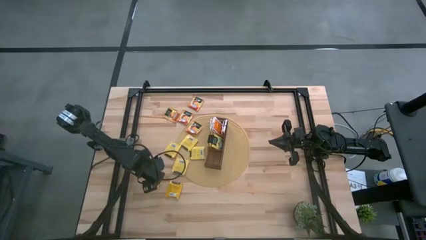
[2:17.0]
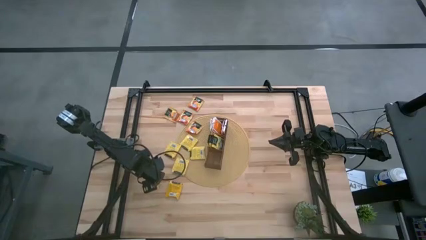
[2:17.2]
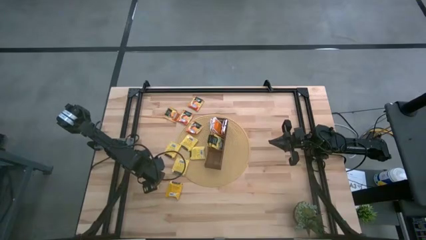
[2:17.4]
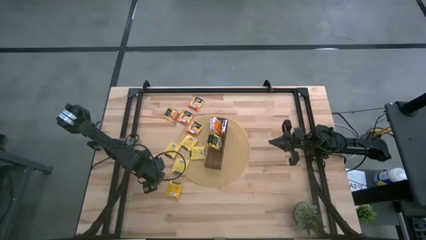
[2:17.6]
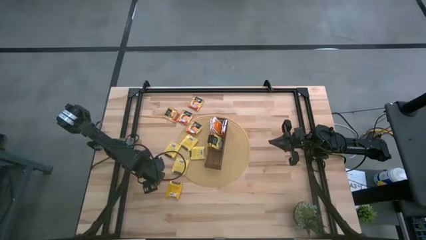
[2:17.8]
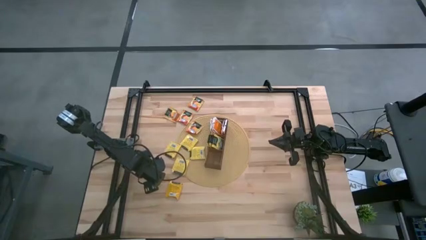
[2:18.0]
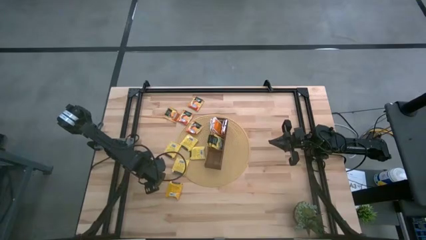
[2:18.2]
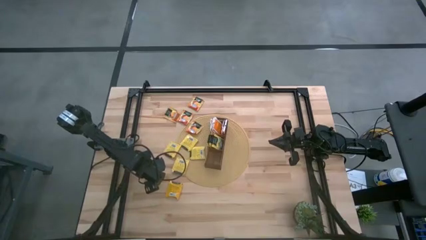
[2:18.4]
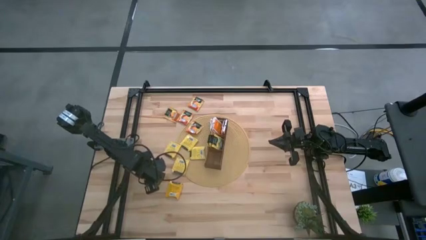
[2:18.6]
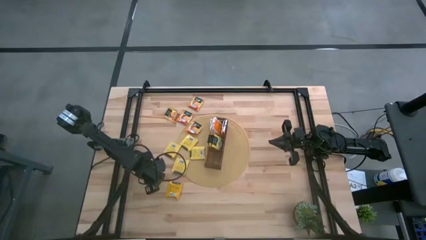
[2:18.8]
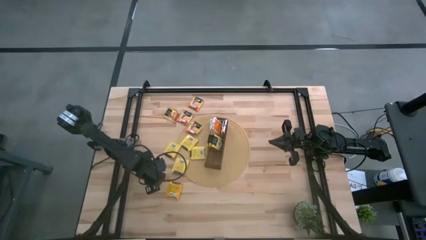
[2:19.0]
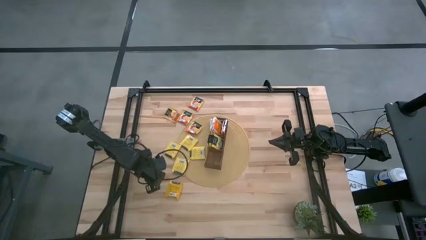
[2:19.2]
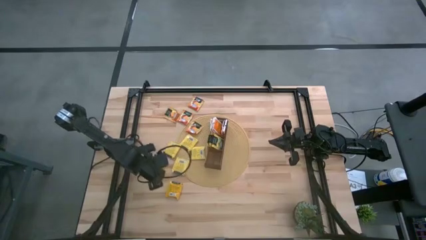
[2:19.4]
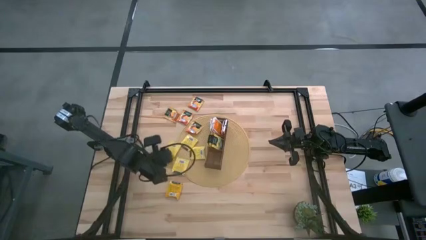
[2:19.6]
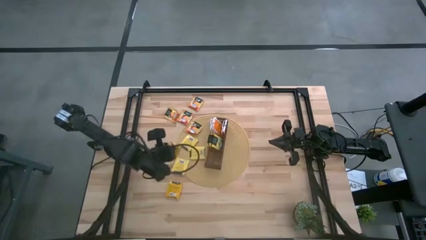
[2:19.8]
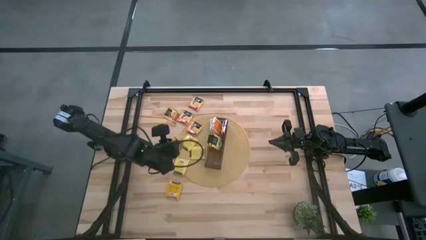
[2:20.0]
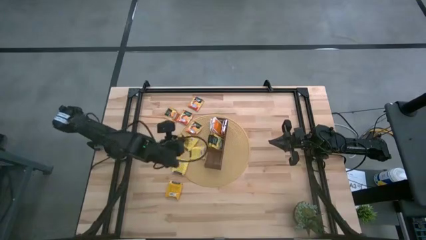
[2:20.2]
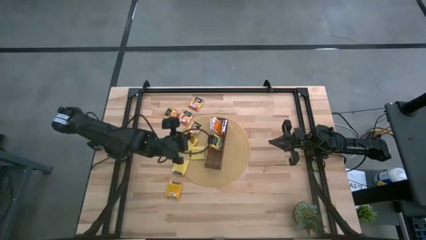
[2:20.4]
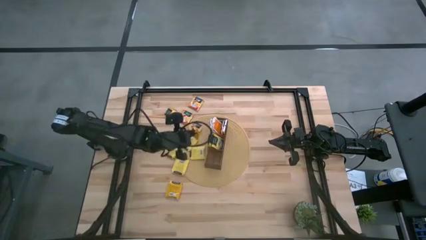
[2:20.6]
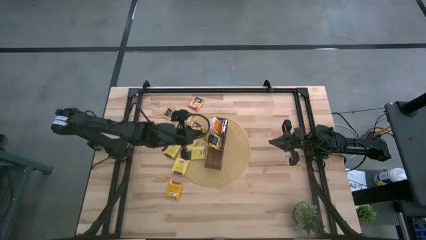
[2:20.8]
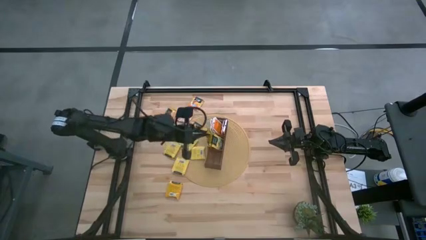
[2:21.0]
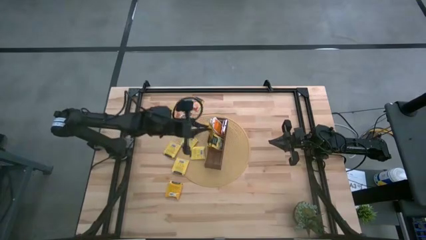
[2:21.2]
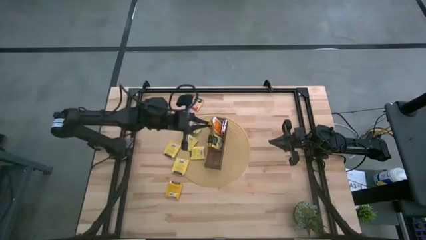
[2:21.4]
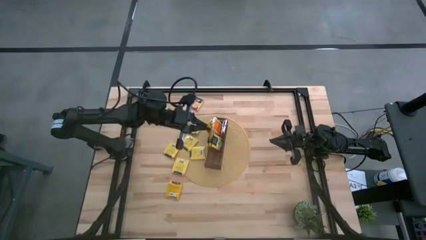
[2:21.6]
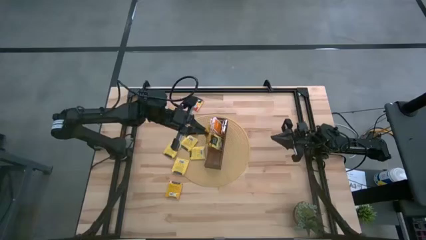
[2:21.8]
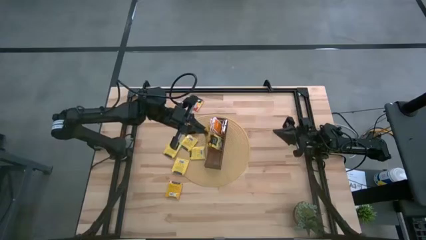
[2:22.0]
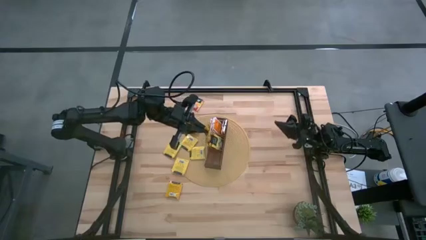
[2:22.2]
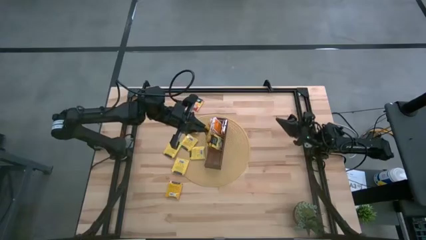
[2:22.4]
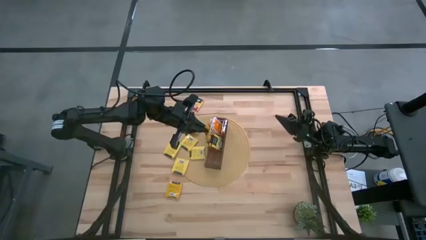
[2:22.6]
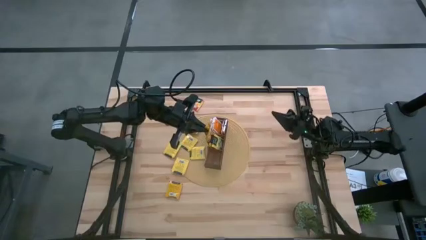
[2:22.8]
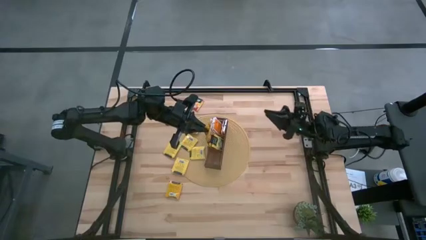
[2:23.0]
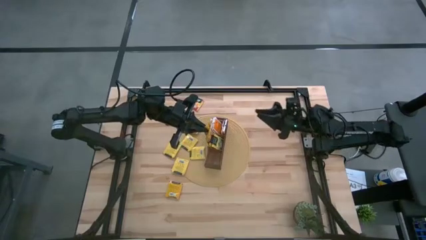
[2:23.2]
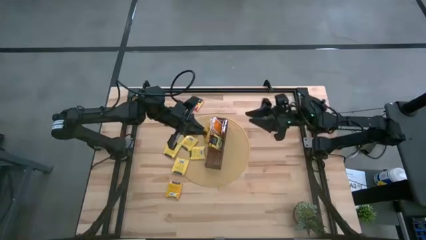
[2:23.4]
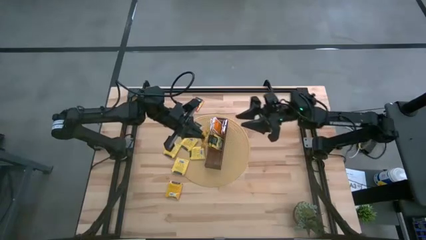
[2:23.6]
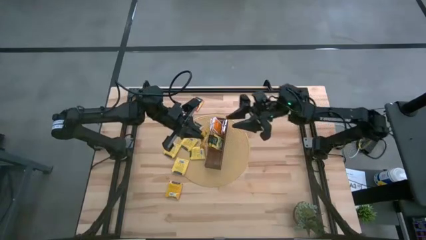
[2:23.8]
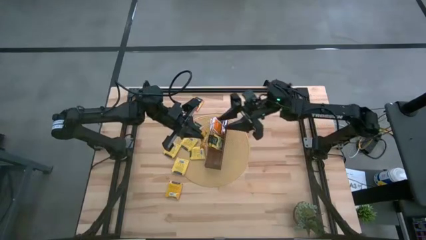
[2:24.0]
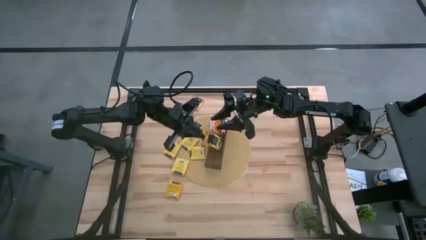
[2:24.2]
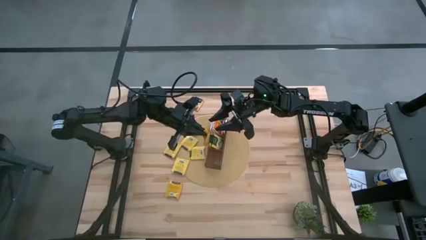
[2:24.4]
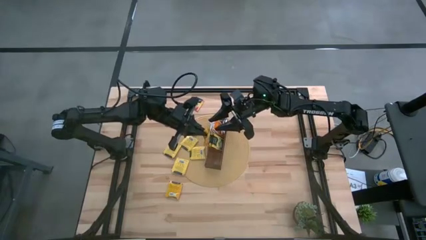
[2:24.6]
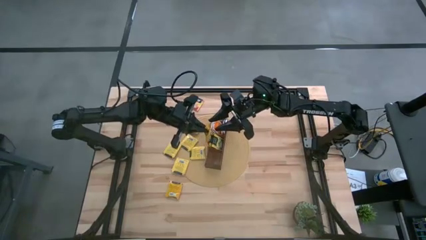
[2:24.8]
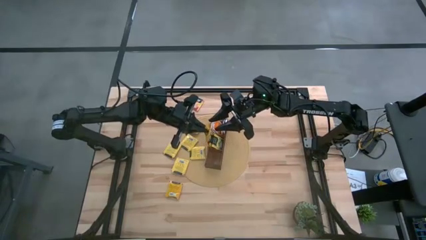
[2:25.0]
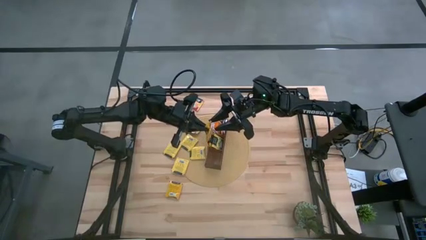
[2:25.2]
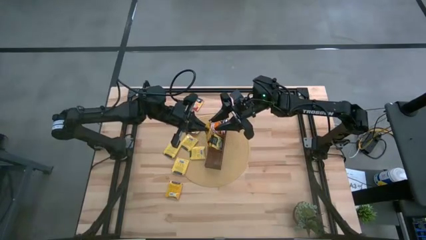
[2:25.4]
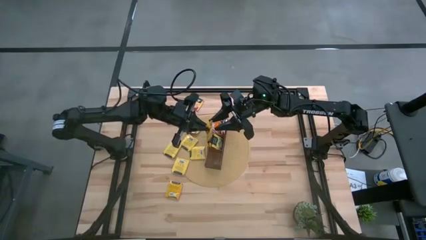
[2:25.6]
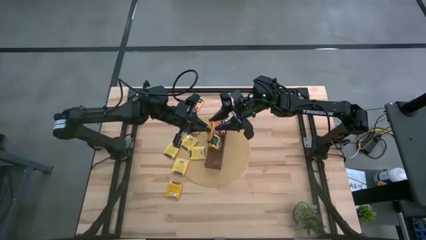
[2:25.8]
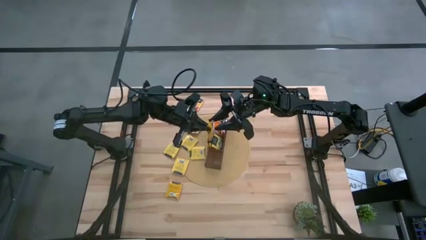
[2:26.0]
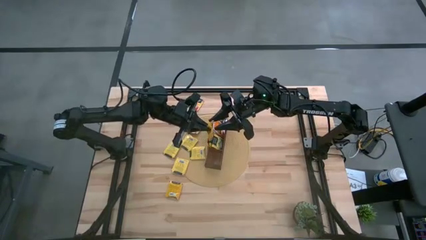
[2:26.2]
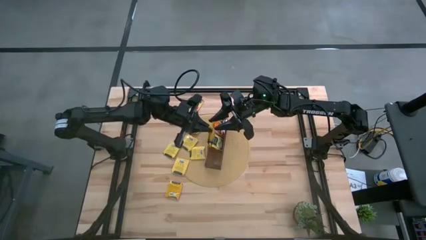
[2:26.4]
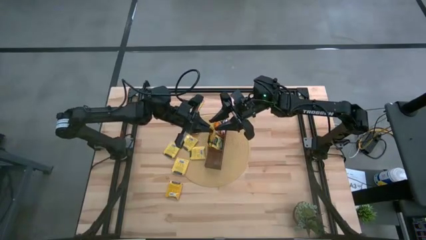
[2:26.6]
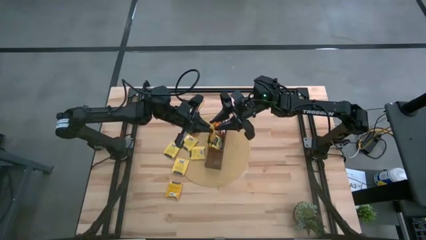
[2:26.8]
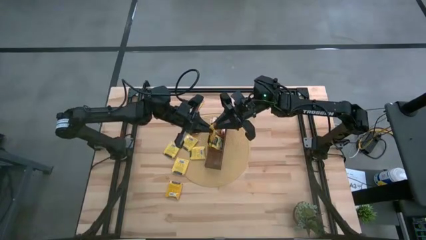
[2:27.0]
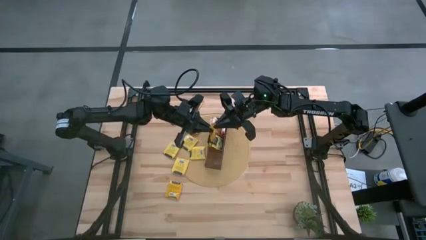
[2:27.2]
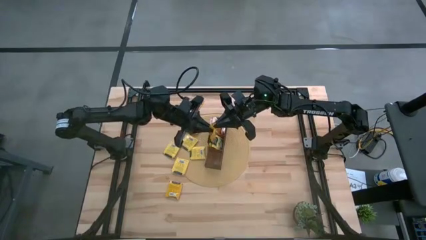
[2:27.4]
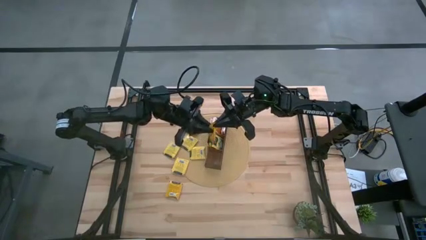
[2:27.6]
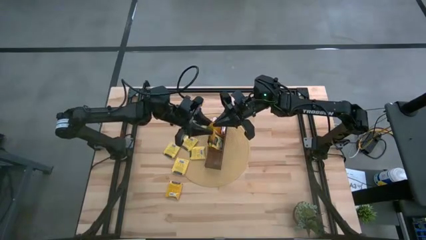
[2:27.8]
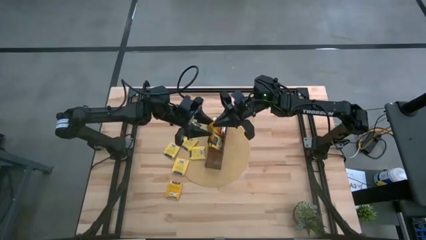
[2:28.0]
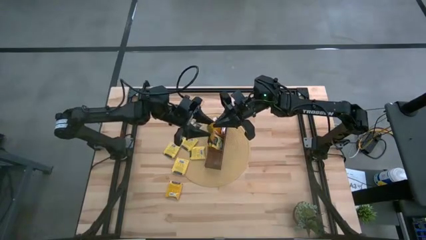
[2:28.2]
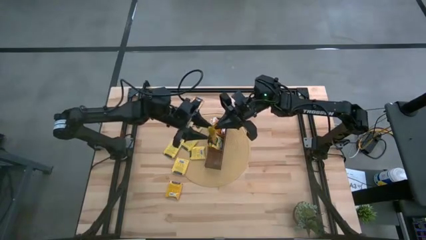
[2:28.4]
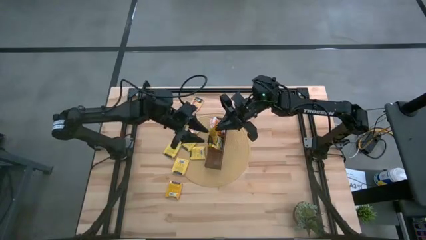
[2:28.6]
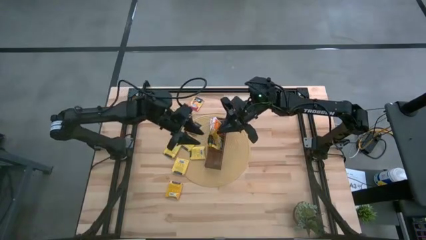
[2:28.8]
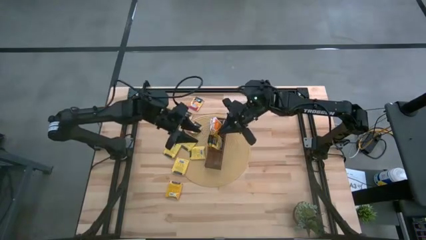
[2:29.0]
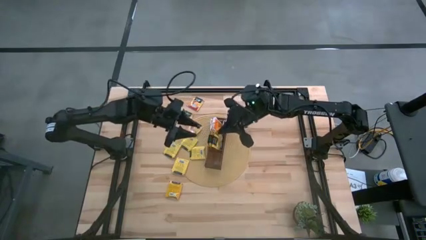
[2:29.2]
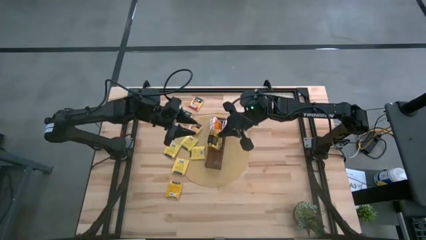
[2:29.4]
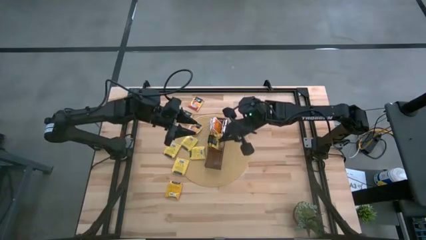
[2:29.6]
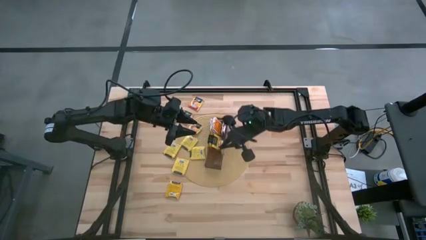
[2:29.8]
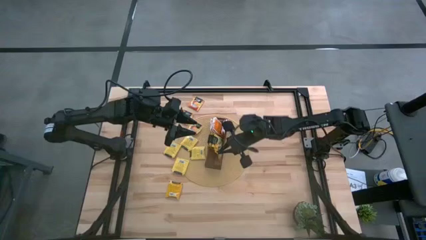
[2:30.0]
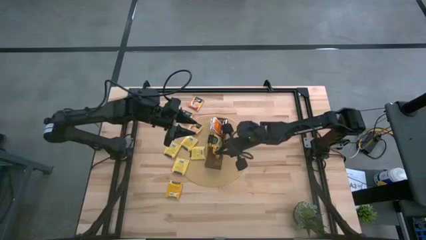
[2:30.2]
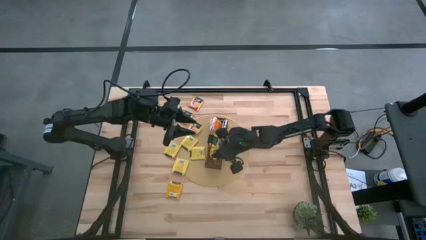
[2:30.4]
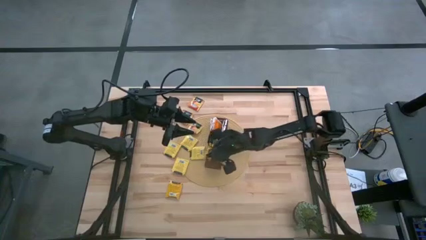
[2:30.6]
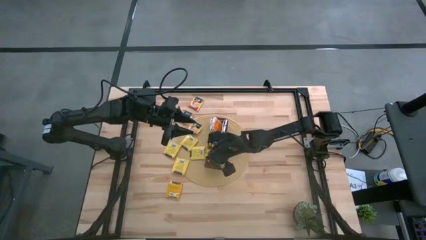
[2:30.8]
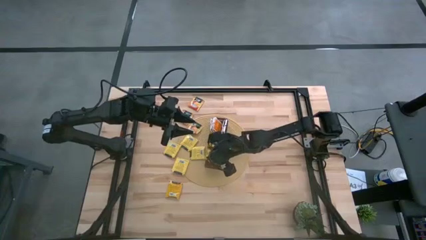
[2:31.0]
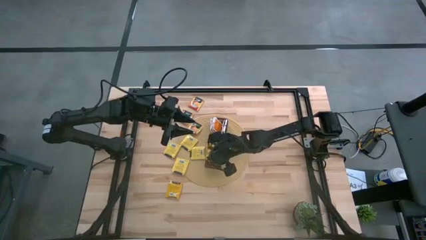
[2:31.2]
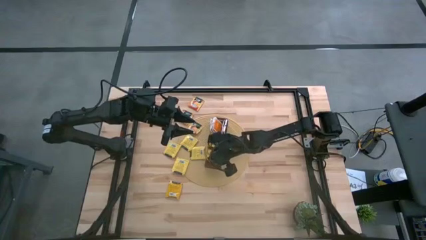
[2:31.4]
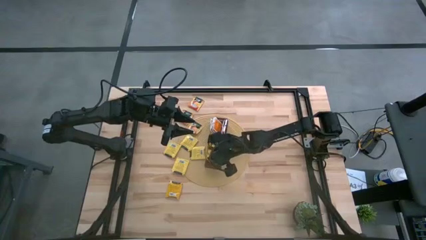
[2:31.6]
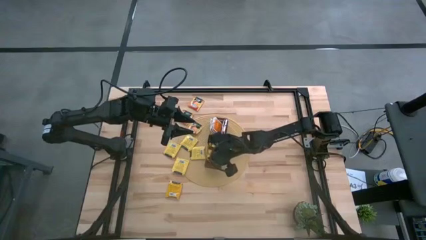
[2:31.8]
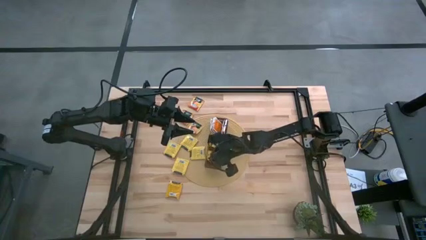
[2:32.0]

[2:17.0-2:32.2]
Task: Pick & Place Tea
Put the orange tea bag into the bottom section of the wooden organizer

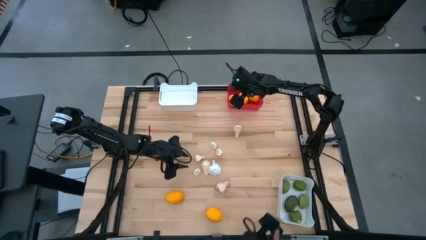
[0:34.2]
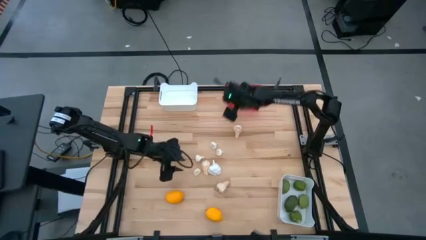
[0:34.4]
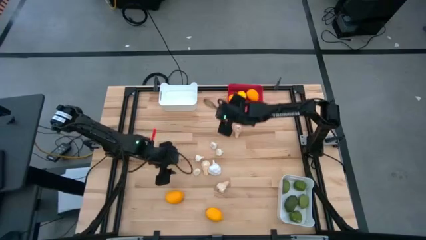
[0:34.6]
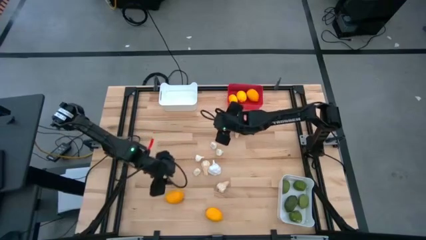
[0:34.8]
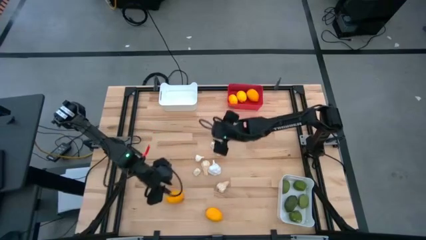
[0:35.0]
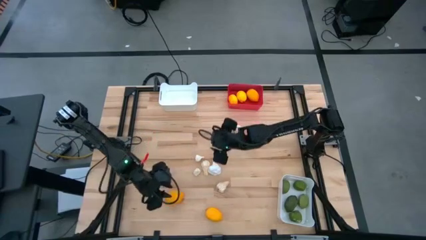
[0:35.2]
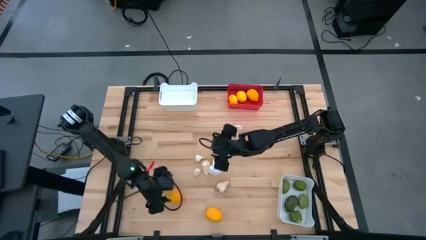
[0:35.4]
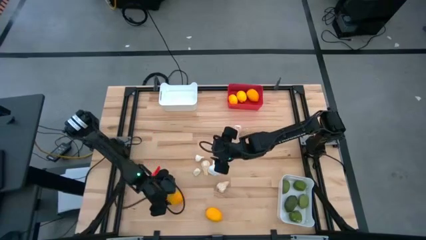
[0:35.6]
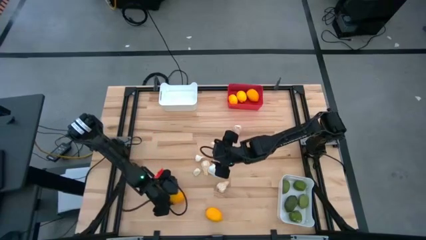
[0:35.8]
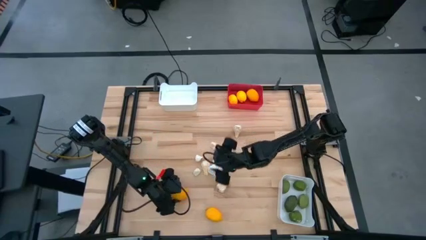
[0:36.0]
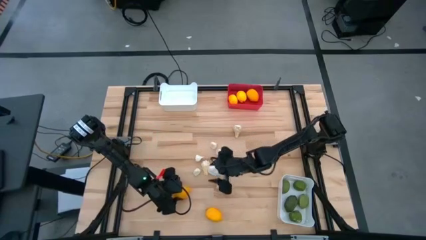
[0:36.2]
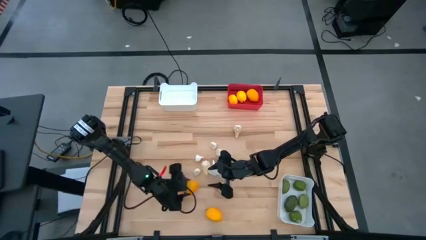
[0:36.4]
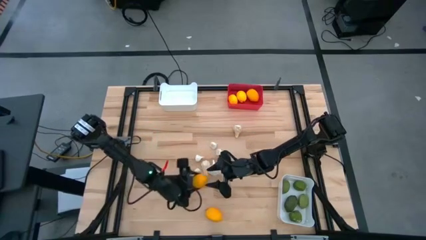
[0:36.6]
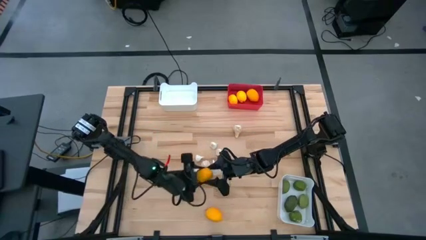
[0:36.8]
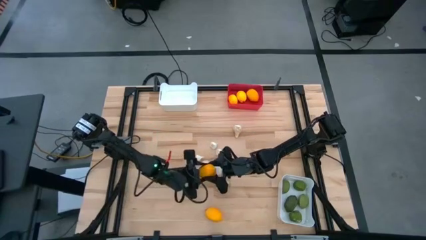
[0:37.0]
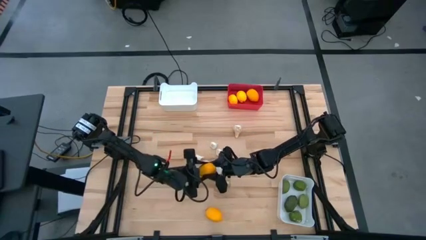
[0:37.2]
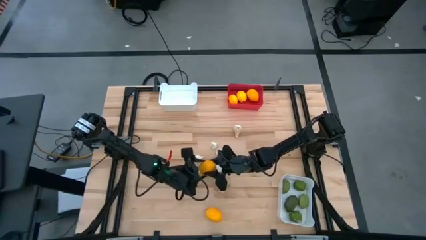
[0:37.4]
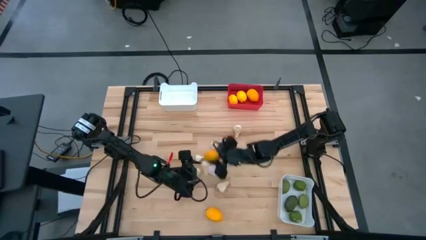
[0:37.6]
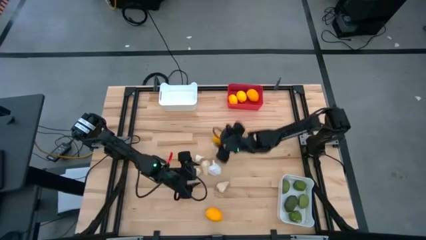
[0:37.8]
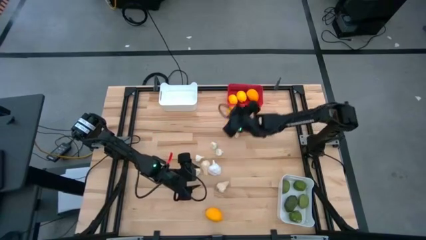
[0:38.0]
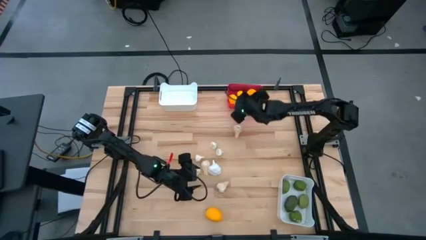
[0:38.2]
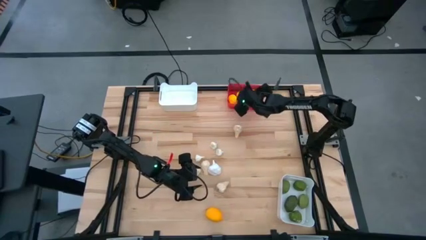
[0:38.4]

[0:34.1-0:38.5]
Task: Sort produce into baskets
Put the yellow lemon into the red bin
